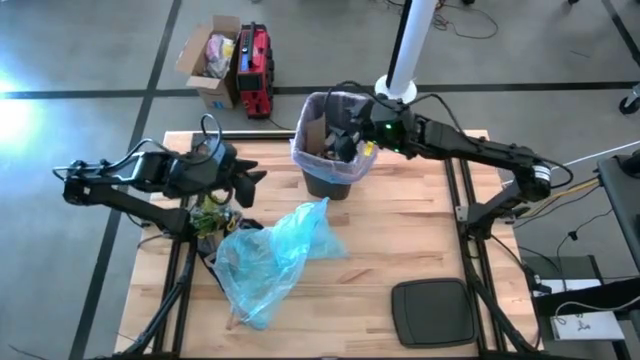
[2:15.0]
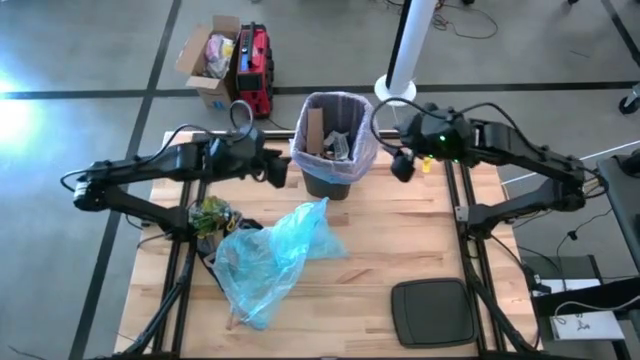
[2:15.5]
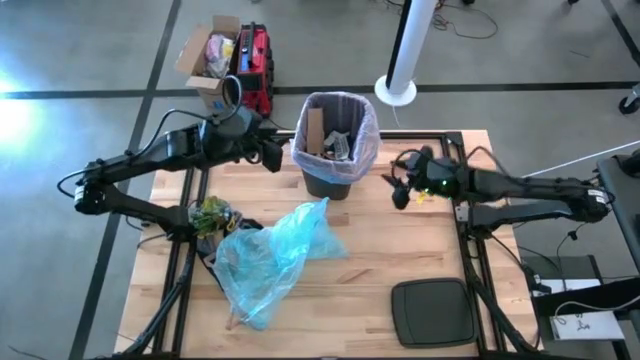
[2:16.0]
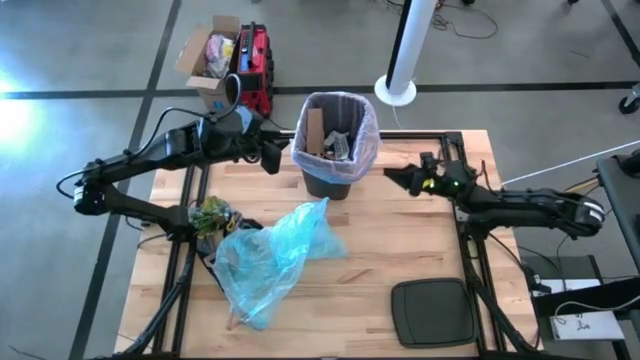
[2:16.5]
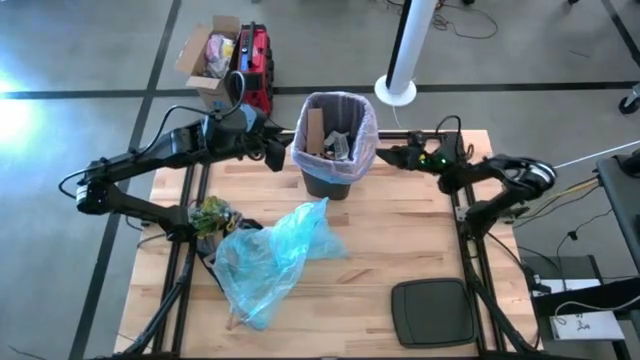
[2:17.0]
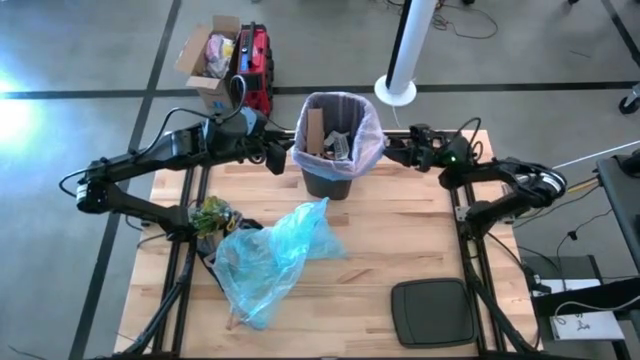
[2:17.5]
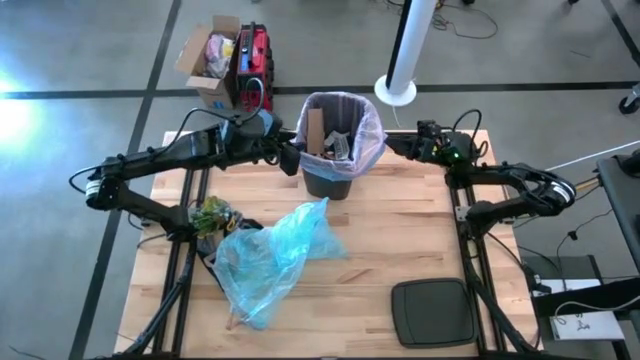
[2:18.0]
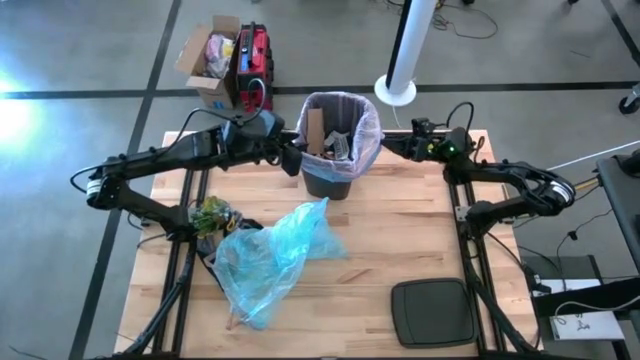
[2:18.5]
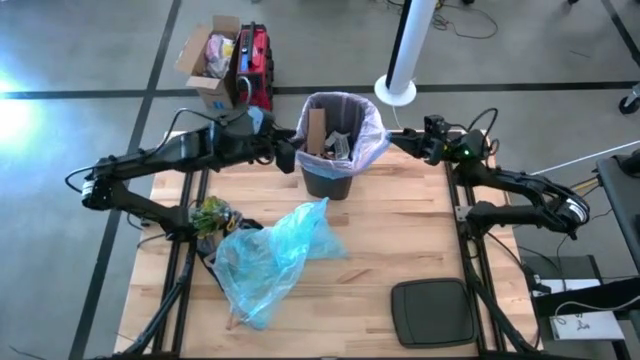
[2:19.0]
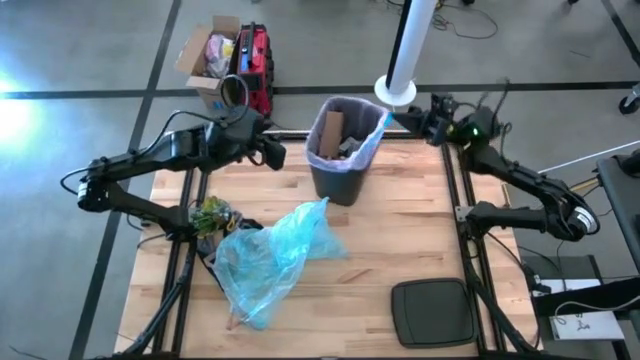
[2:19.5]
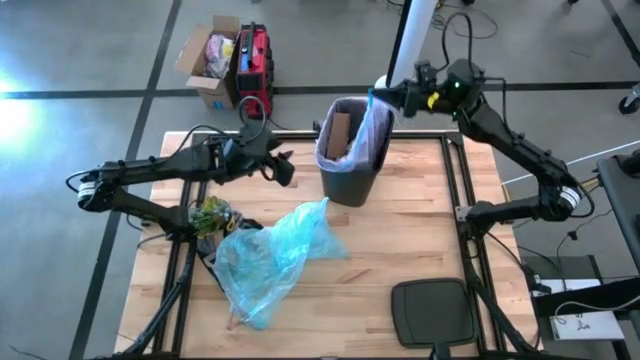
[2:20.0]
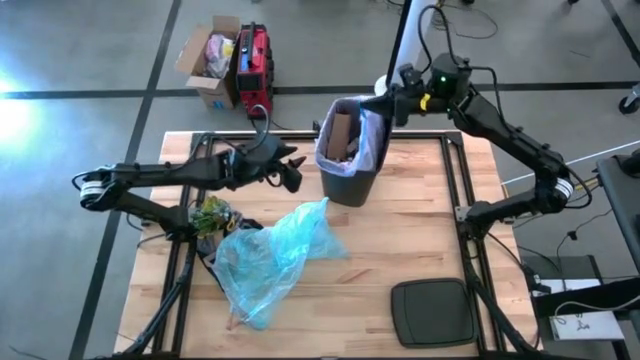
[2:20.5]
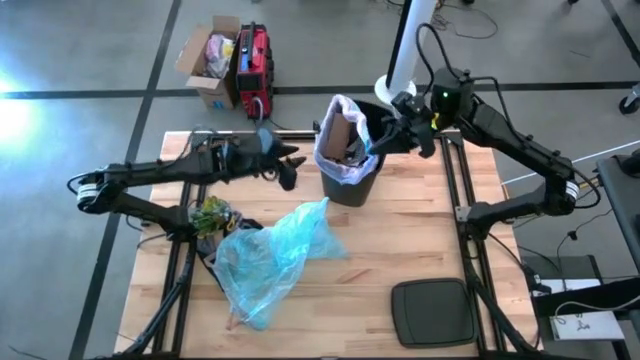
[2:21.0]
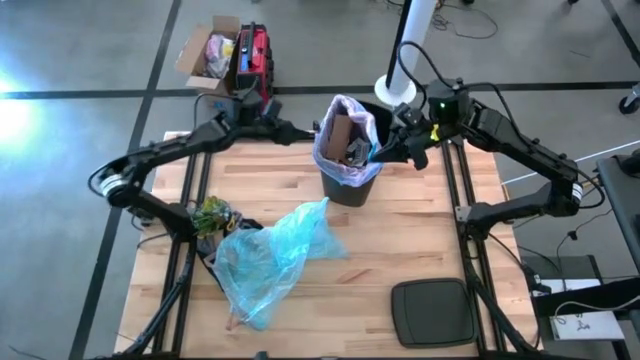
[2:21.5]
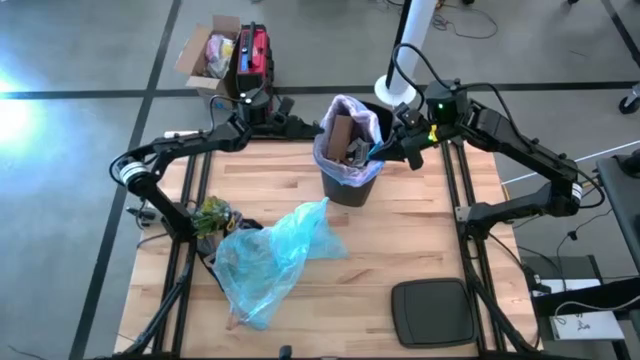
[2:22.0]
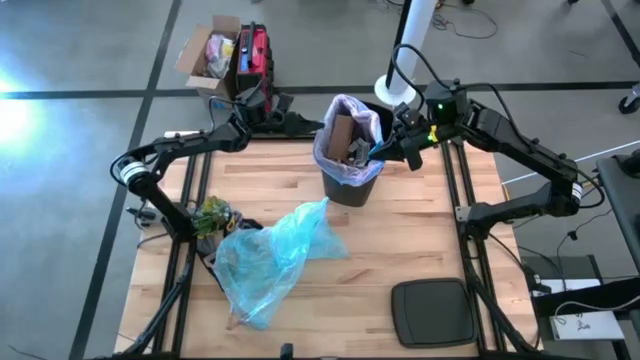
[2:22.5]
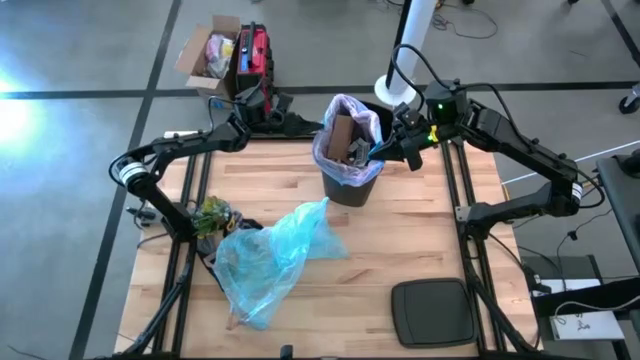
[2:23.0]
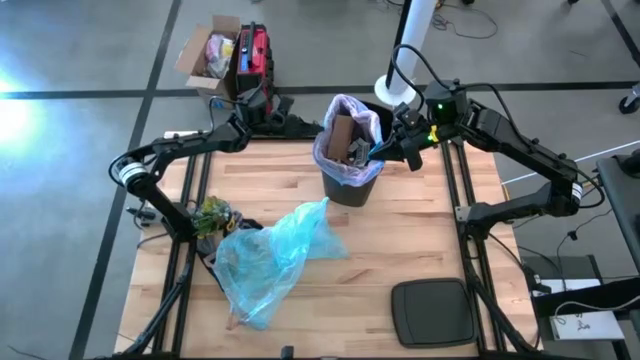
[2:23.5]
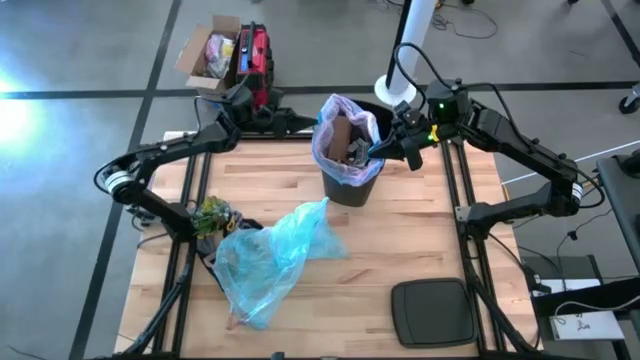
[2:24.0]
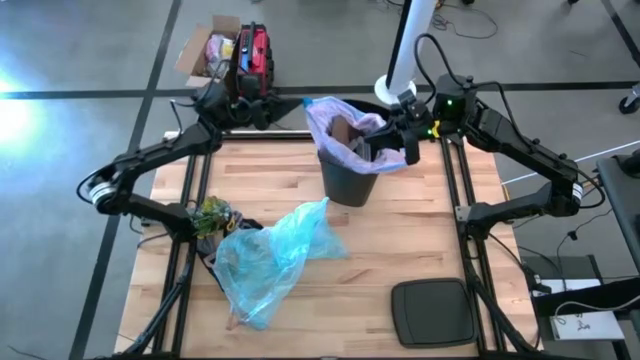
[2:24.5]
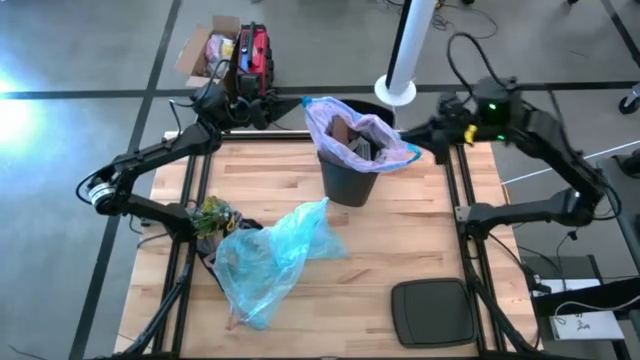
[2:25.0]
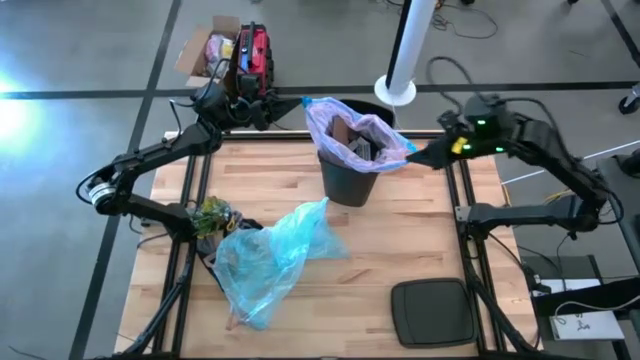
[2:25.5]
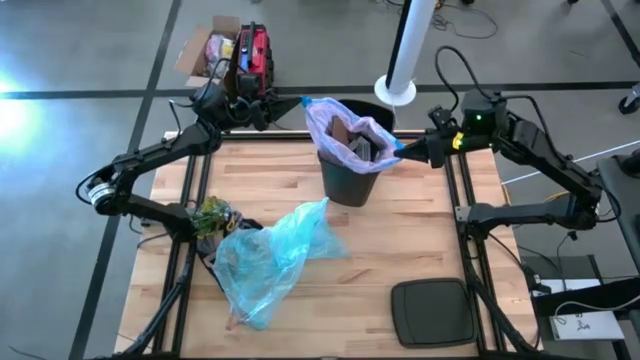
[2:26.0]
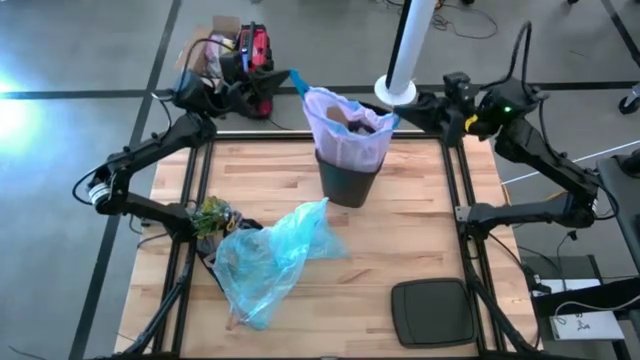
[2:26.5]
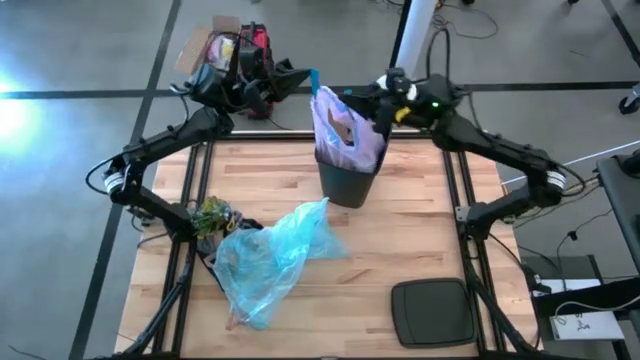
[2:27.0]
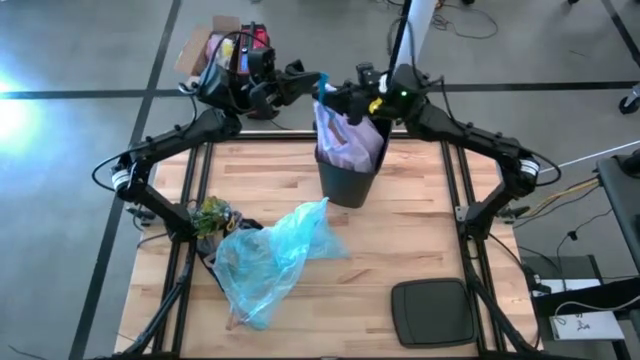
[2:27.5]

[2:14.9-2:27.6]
Task: place trash/remove bag and relplace
Close the pink trash bag

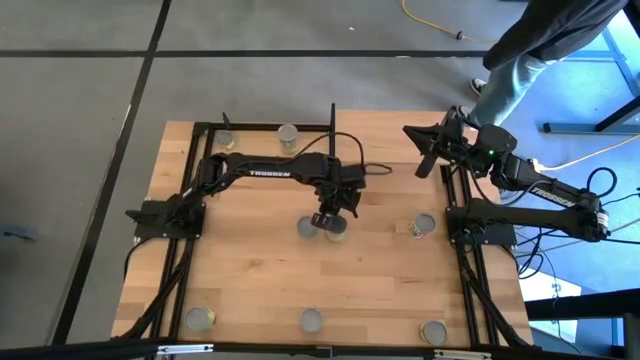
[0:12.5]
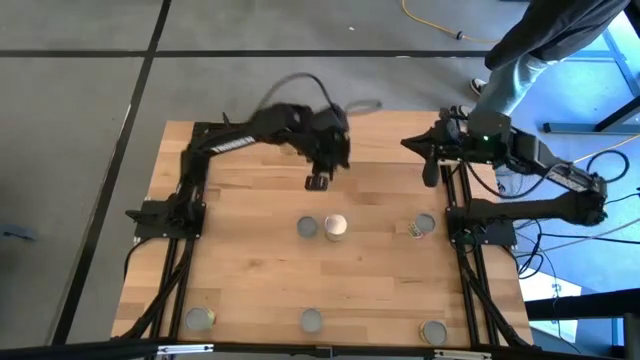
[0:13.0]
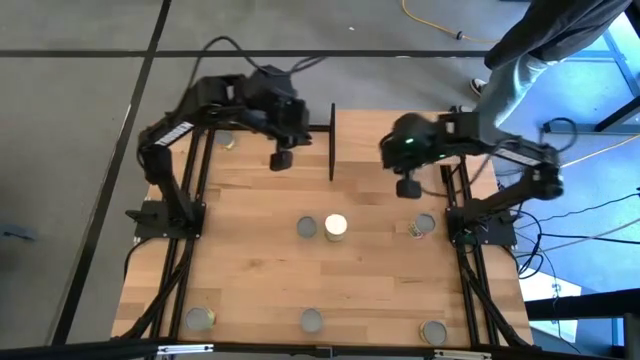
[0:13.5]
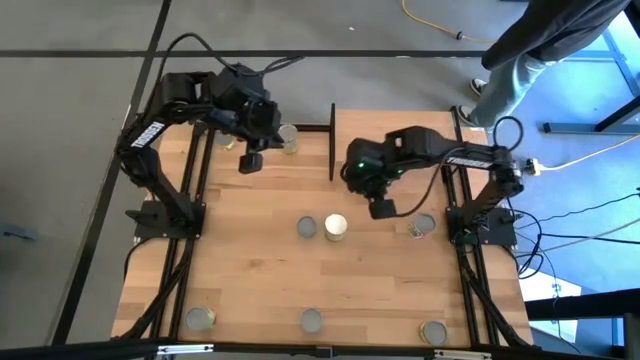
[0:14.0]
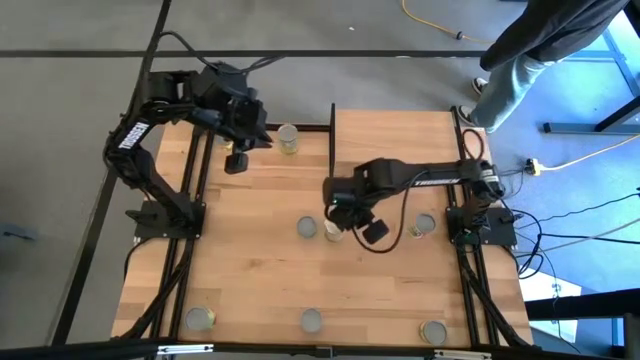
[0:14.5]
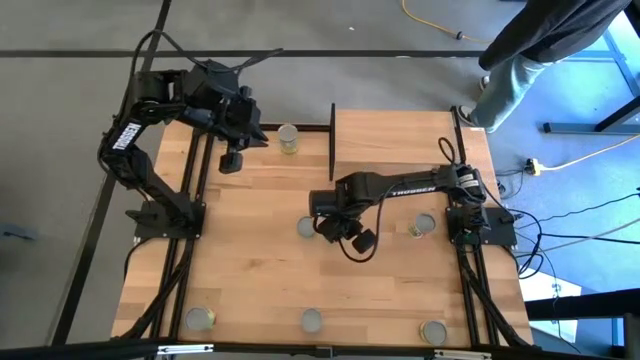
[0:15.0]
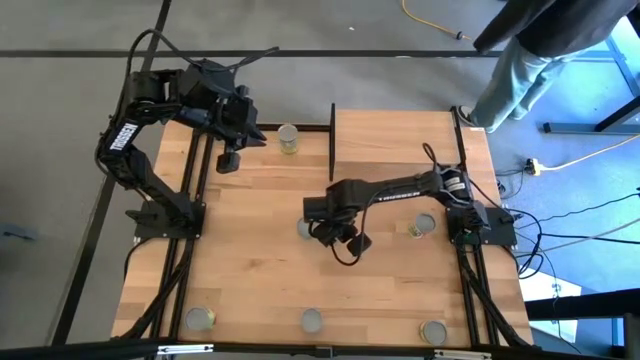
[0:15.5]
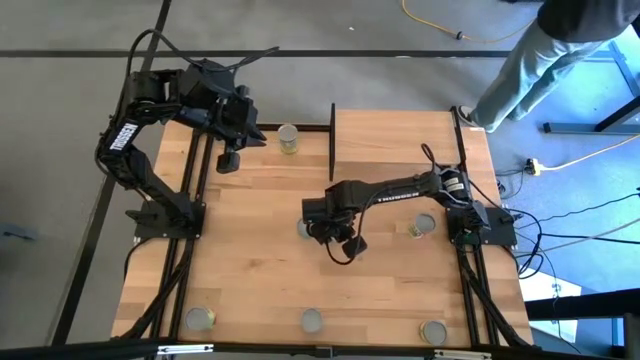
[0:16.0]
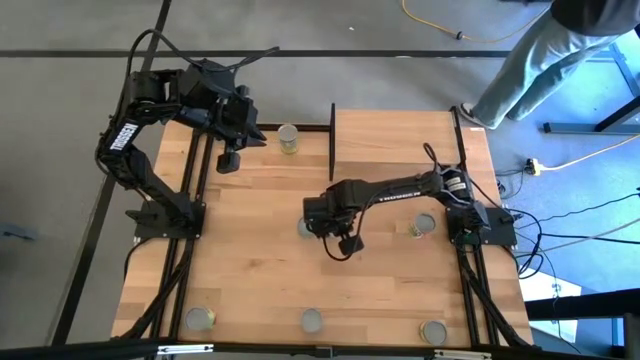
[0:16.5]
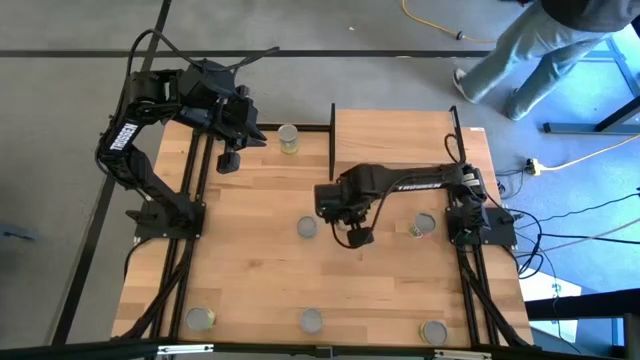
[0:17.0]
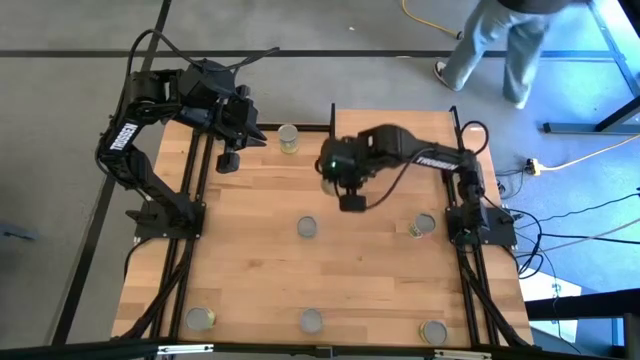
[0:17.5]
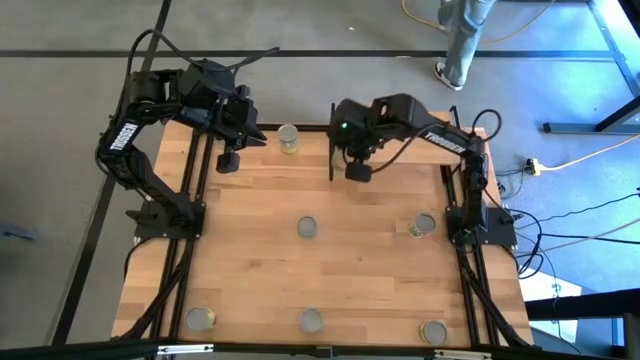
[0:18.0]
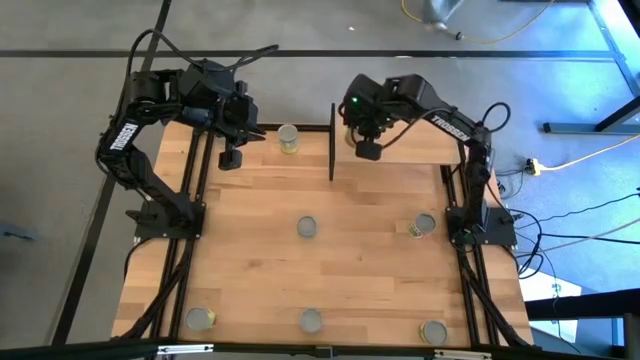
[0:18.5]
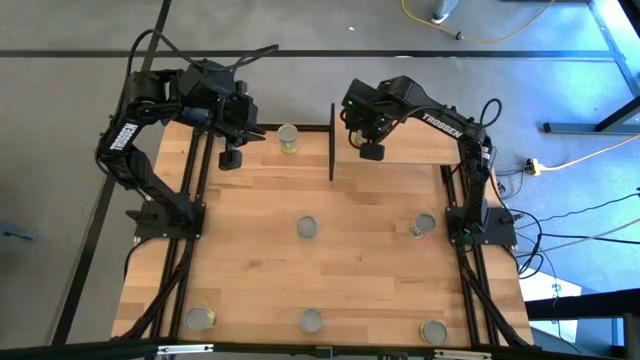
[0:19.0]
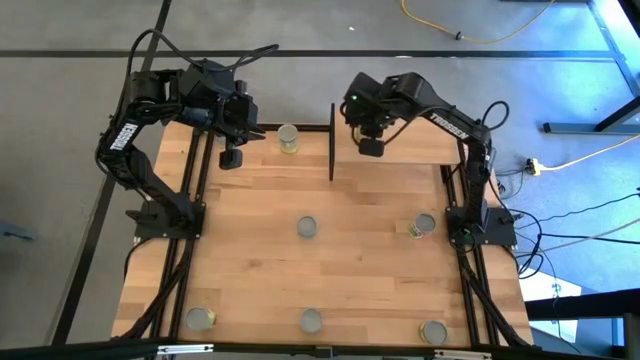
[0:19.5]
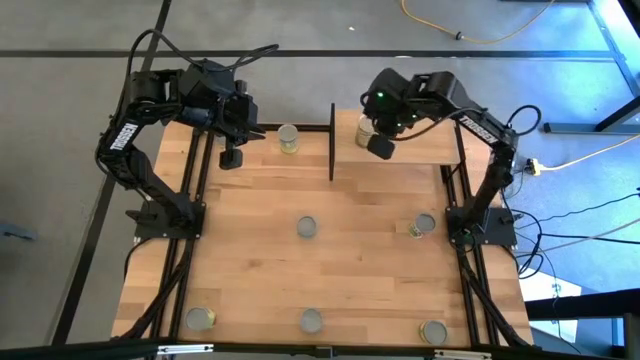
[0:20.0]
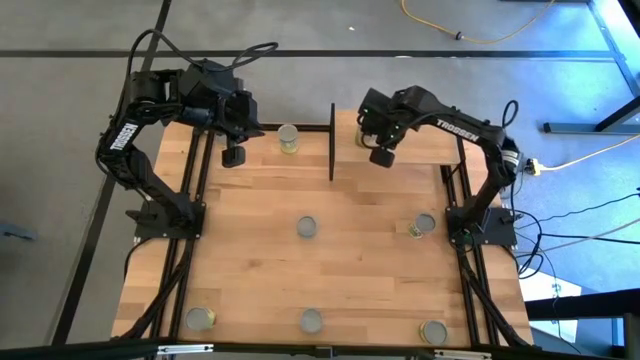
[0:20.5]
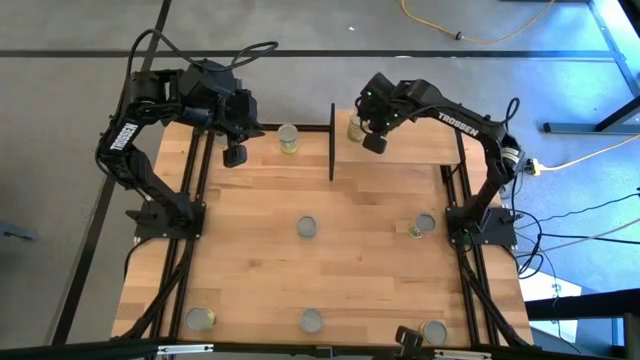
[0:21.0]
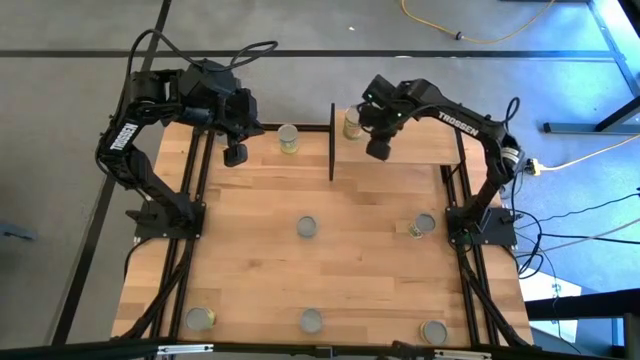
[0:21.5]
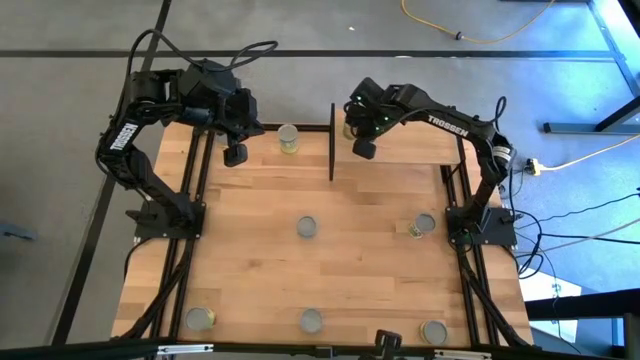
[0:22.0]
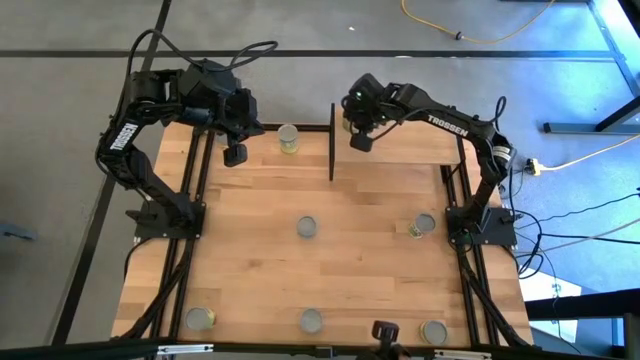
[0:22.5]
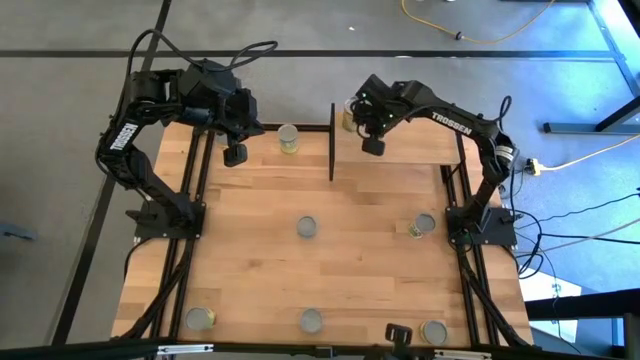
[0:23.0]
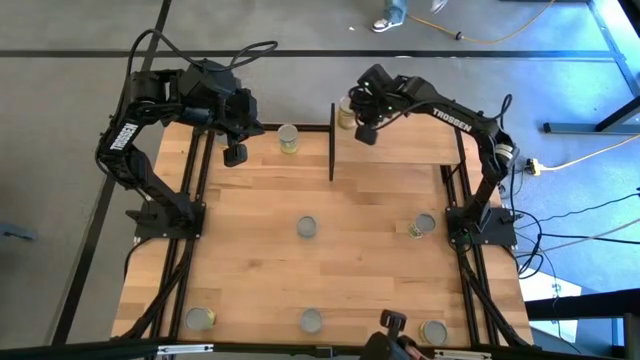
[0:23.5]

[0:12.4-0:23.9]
Task: Pick and place cans onto a shelf
Put the green can on the shelf
